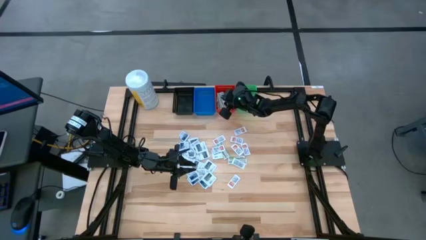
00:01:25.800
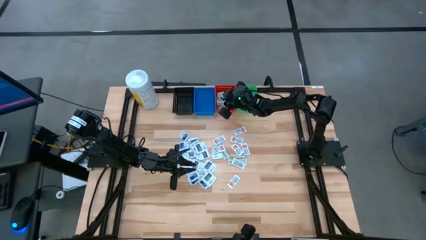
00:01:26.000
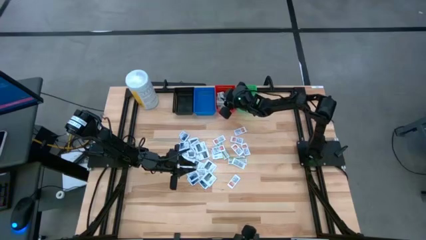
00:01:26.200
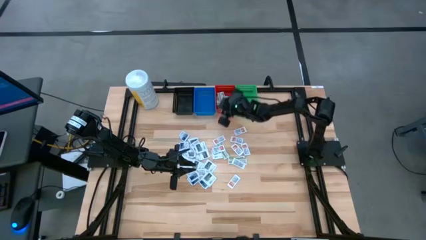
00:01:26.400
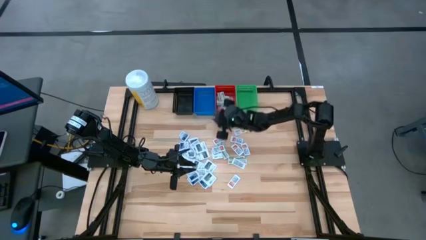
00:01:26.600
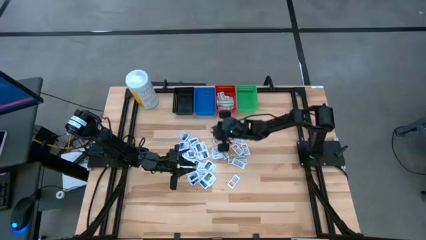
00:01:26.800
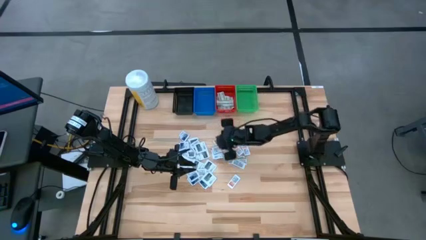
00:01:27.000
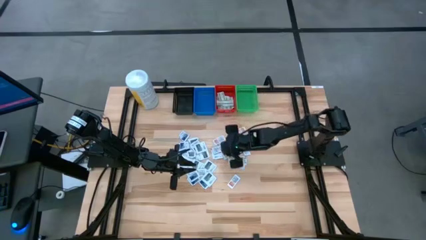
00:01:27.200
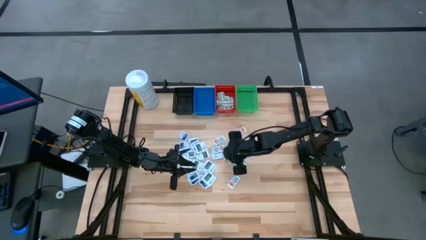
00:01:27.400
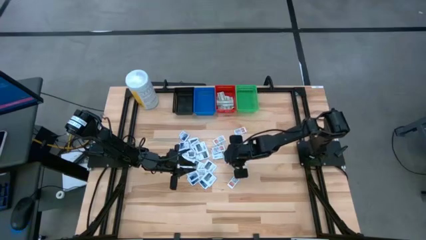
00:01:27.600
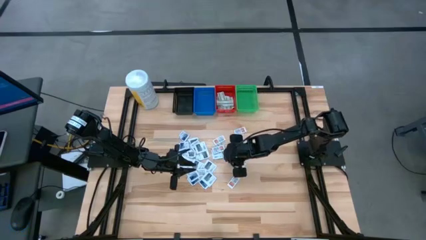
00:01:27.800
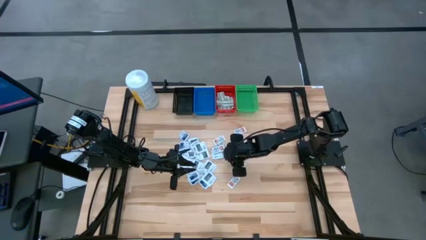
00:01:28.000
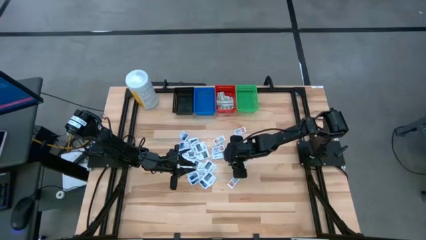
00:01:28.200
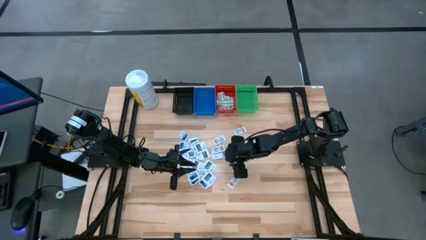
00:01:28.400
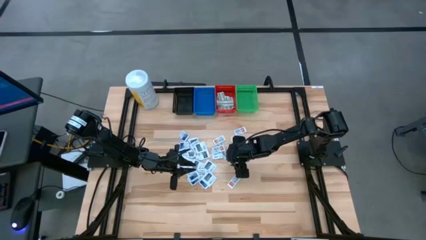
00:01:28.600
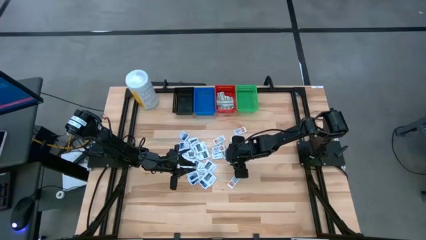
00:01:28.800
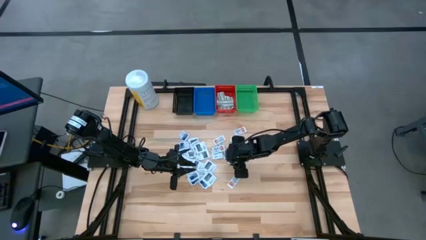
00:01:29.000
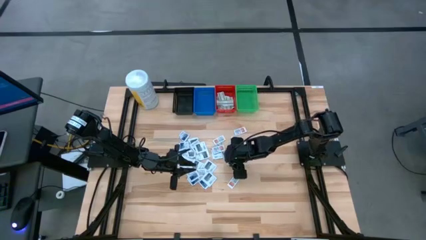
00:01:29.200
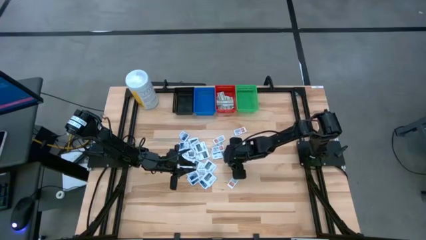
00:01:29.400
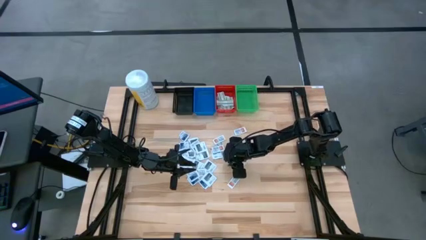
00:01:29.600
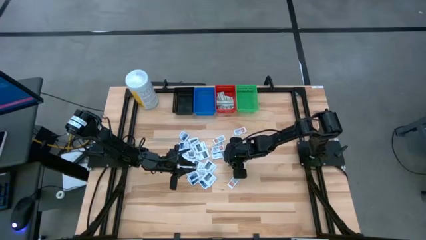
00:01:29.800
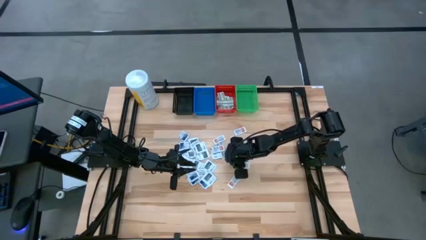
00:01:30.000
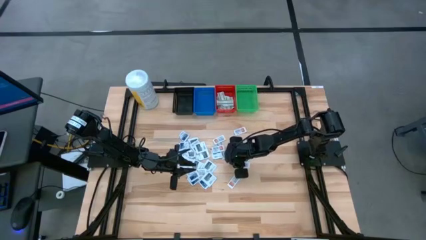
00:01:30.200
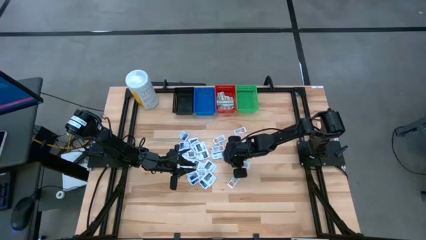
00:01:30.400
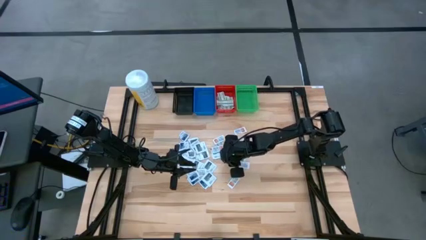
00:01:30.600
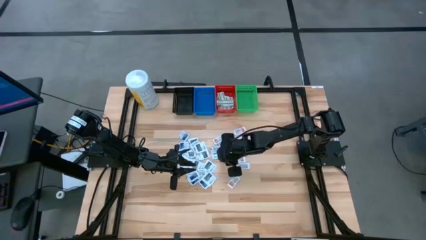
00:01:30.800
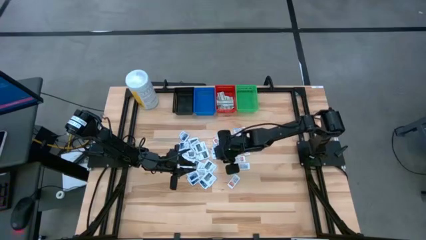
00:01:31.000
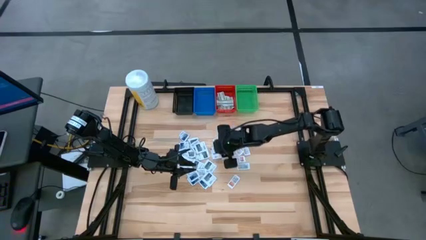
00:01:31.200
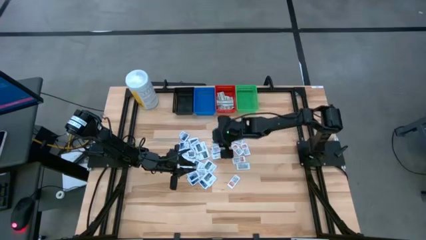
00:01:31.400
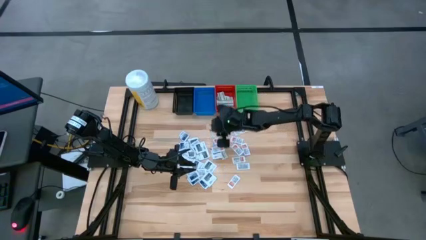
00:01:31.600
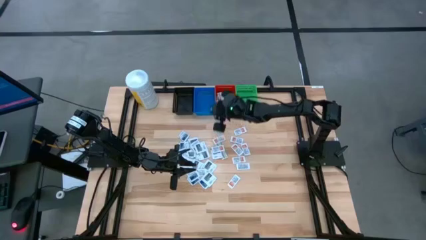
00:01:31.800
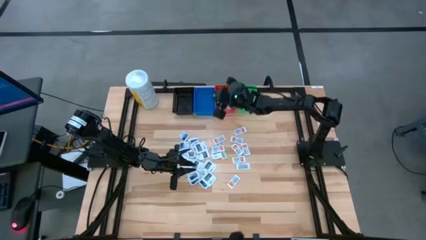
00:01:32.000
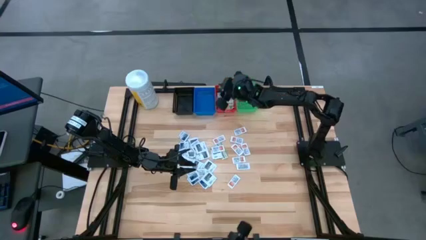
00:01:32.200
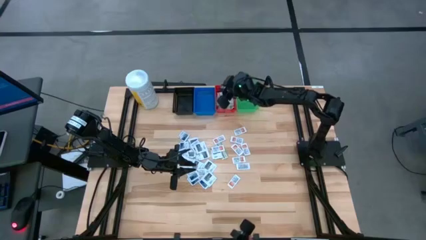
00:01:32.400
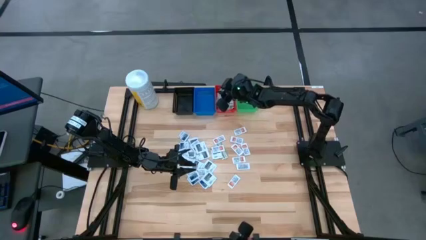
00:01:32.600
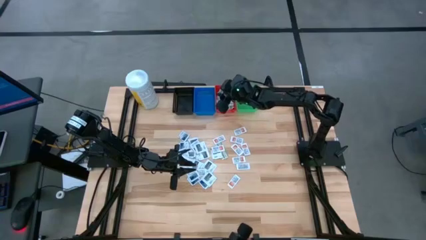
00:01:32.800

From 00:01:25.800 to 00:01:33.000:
Task: Pick & Place First Aid Supplies
Put the green bandage pack into the red bin

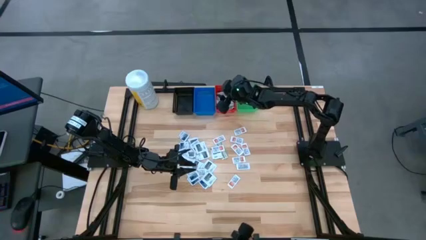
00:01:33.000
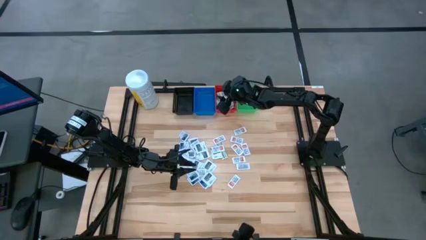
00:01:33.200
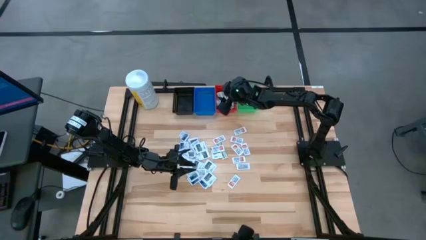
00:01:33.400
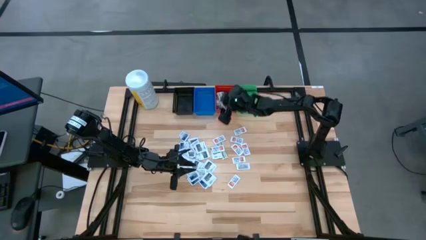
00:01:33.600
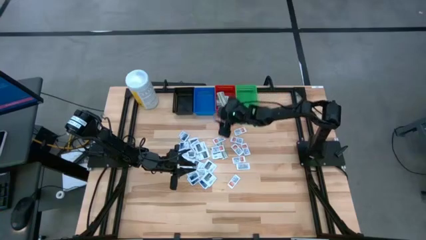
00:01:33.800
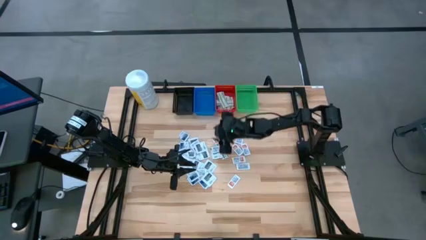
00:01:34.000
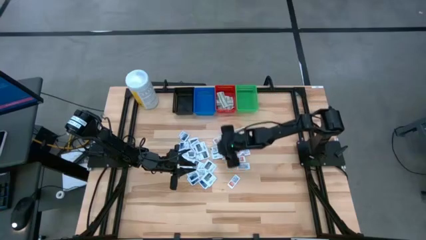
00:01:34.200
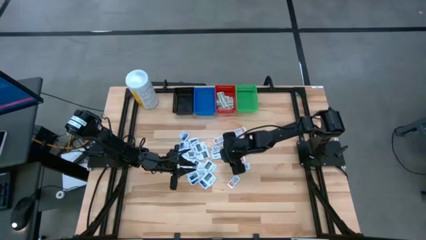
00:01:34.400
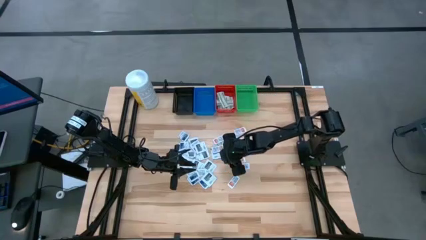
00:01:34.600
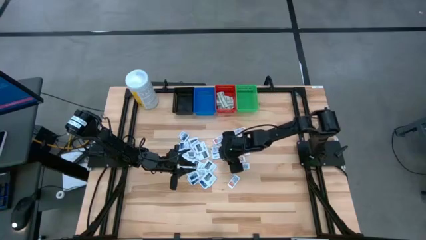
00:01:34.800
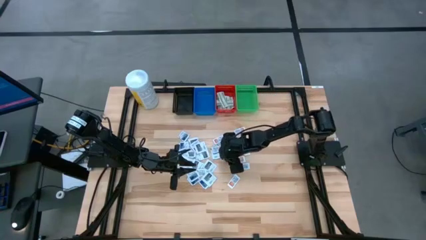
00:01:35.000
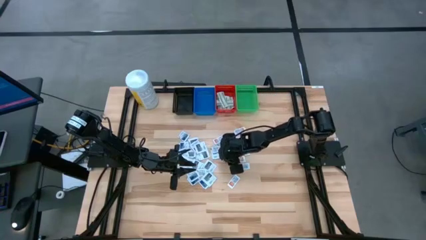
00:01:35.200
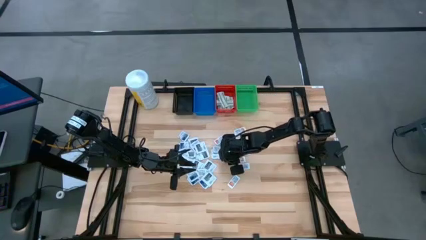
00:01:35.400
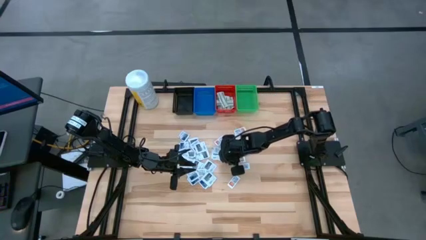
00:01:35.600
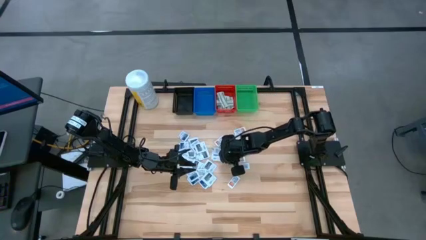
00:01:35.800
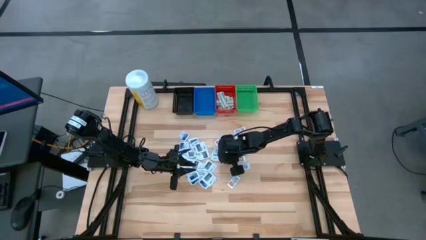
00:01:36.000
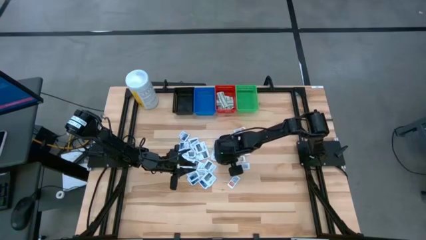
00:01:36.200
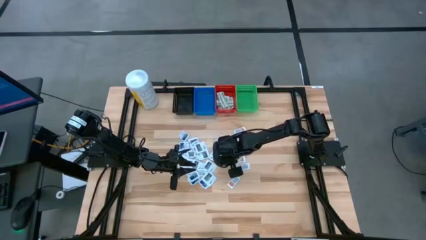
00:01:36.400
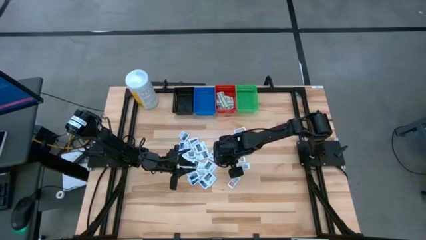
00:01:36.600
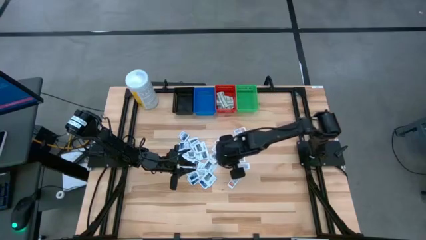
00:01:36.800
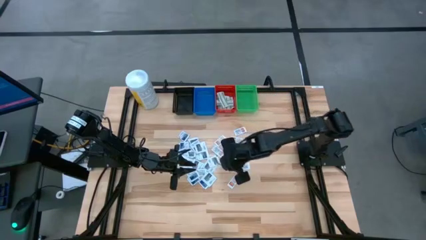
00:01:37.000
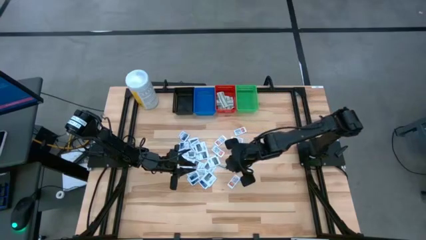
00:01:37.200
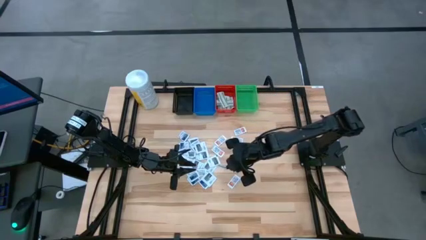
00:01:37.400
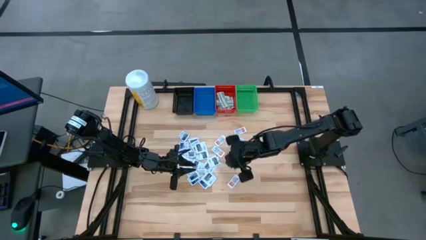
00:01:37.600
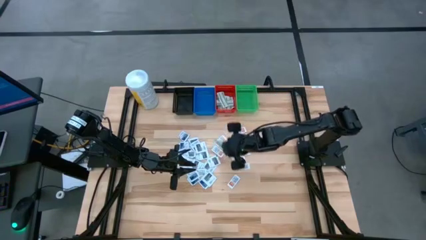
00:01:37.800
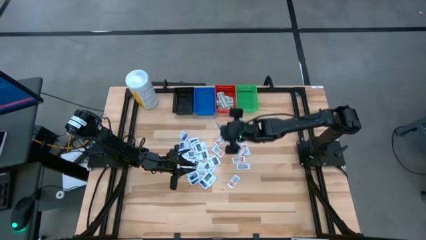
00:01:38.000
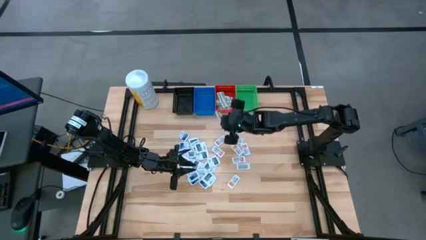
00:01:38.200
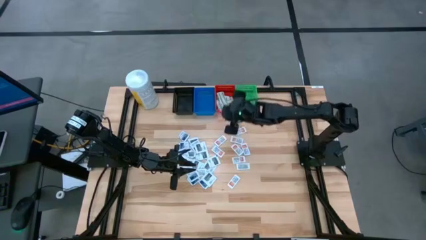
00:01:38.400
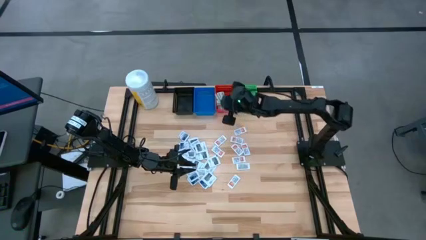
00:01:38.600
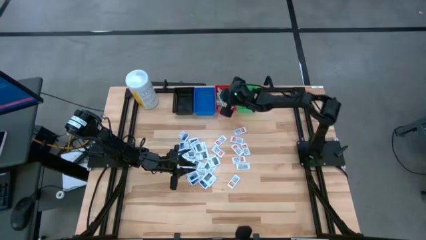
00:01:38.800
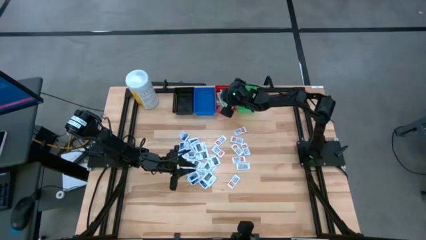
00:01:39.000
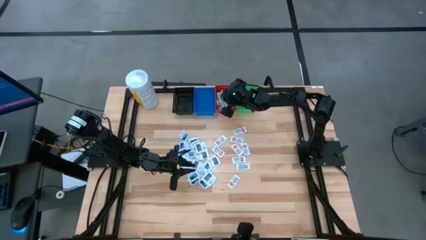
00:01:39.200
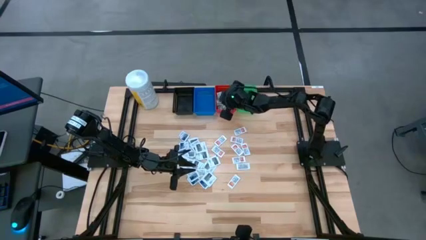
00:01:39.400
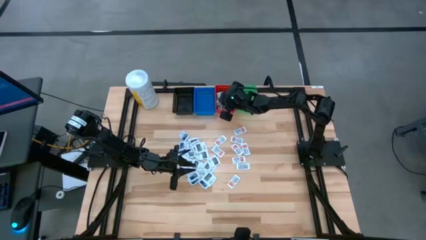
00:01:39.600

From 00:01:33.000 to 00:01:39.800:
Put the green bandage pack into the red bin

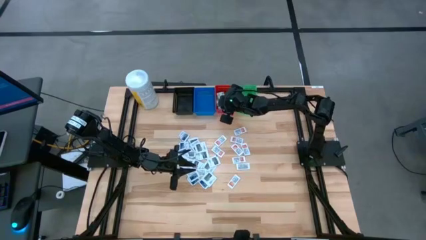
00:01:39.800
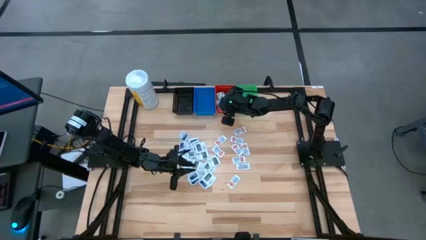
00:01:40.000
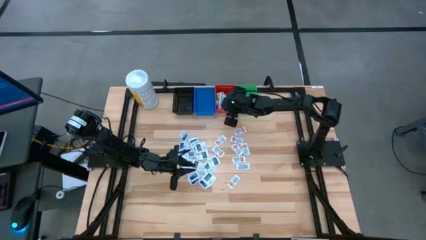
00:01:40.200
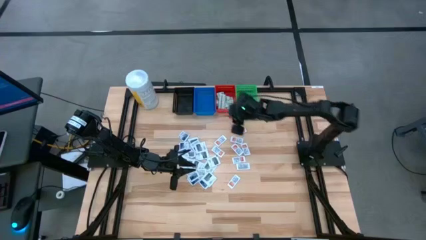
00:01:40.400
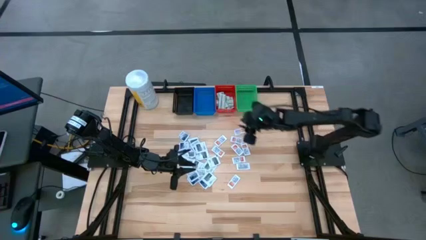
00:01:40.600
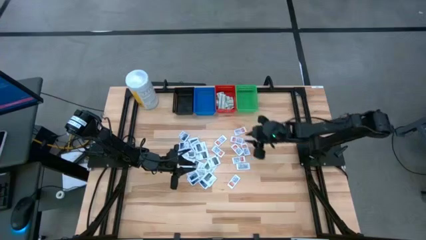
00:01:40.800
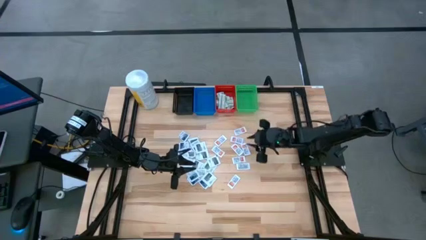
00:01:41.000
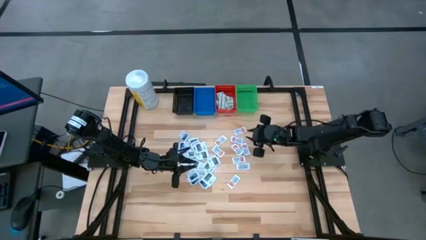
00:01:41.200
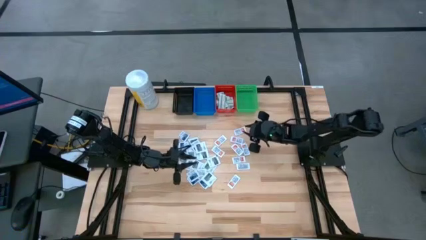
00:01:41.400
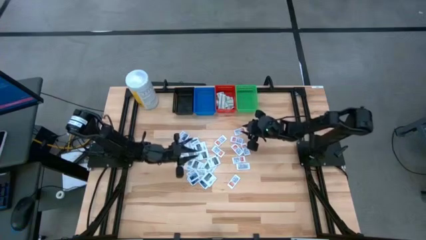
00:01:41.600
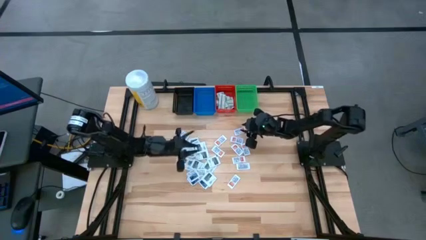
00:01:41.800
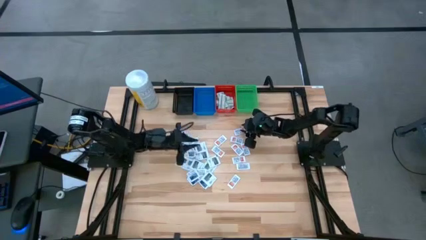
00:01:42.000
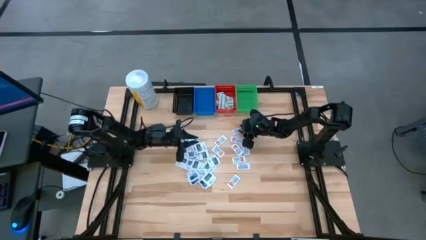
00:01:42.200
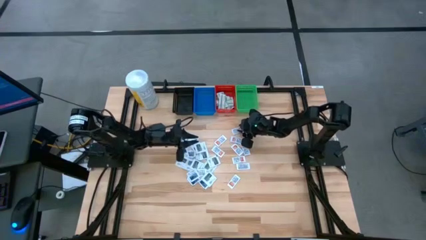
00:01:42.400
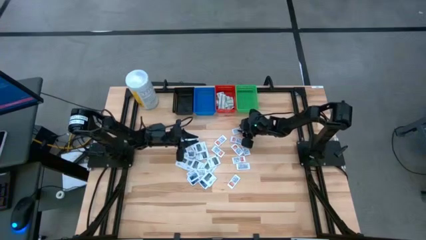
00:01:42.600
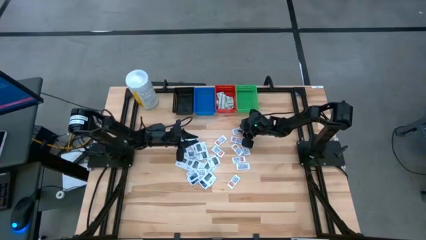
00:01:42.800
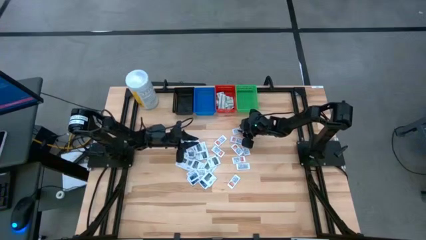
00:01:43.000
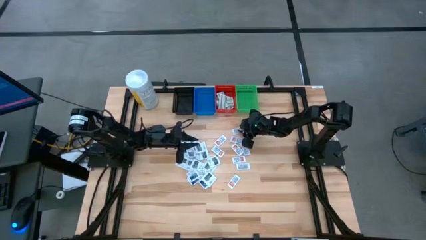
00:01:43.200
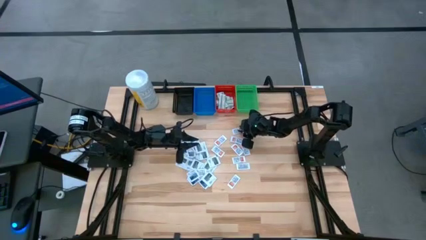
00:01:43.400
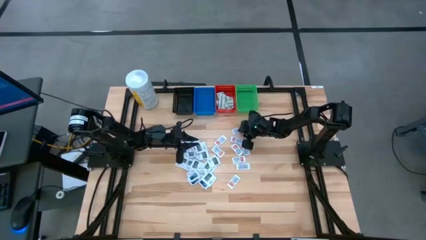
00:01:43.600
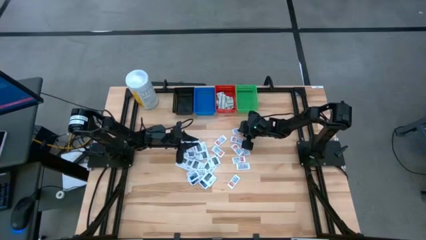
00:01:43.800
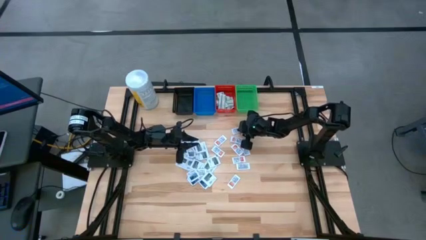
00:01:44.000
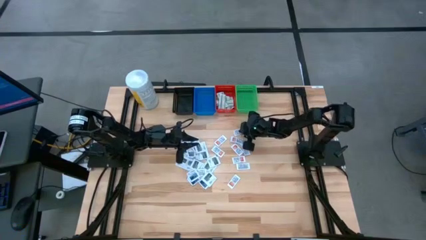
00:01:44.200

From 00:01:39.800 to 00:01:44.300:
Put the orange ointment pack into the black bin
